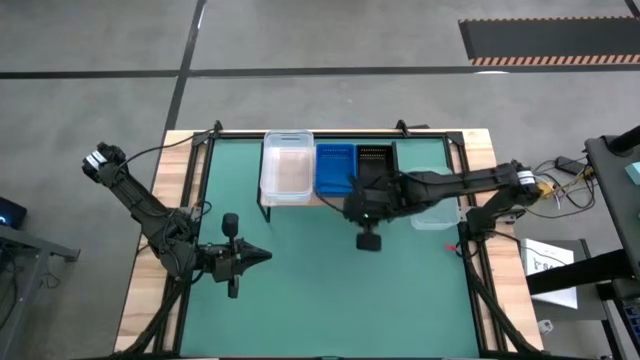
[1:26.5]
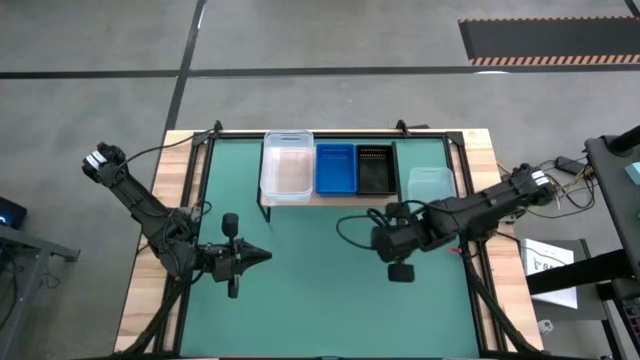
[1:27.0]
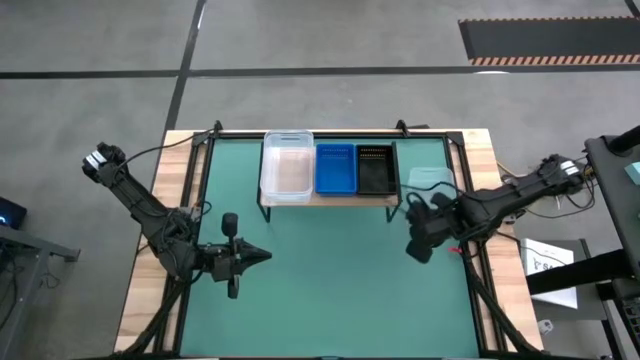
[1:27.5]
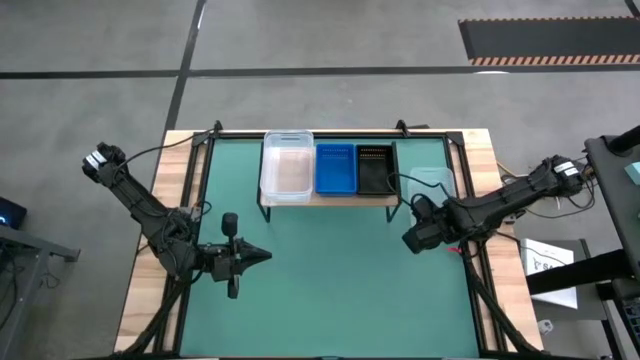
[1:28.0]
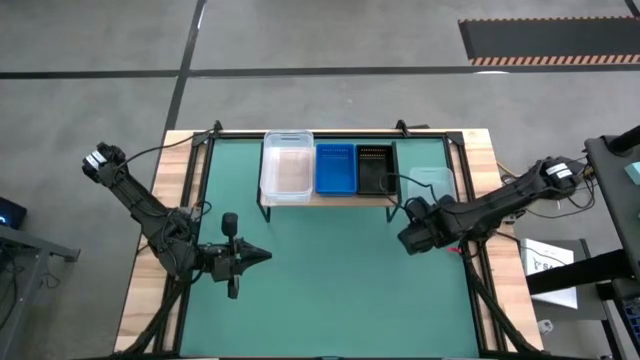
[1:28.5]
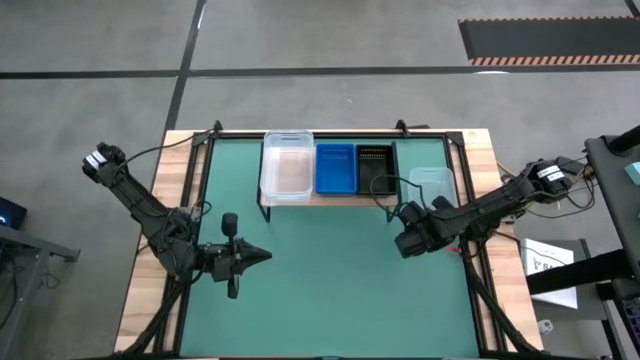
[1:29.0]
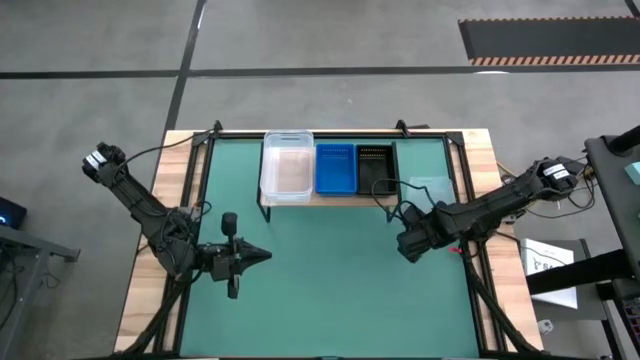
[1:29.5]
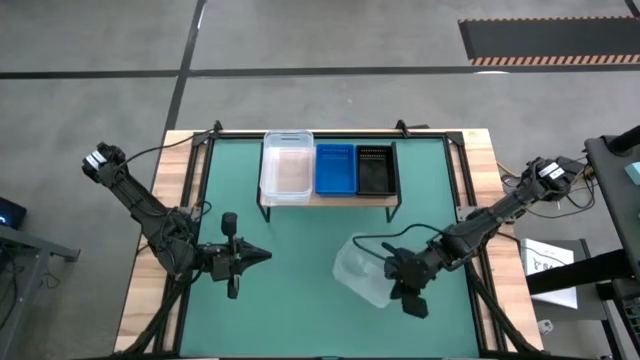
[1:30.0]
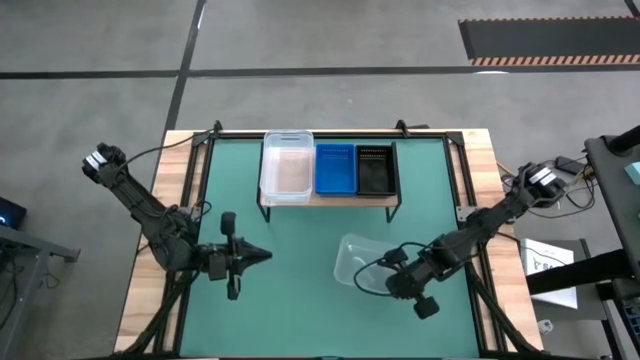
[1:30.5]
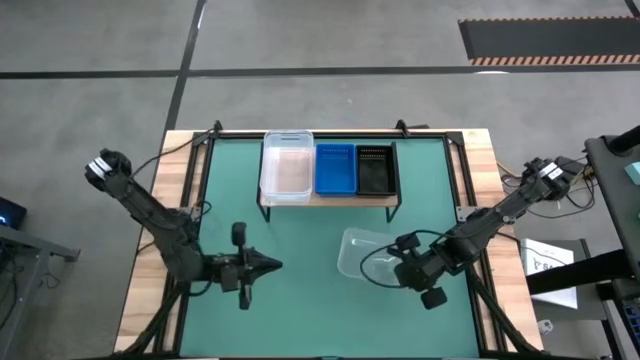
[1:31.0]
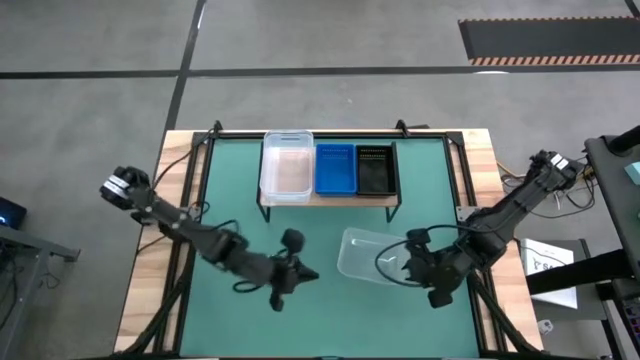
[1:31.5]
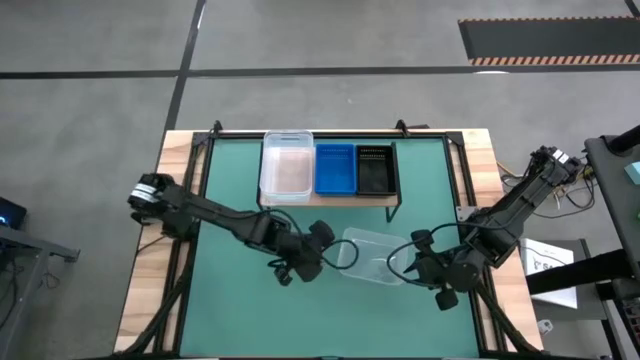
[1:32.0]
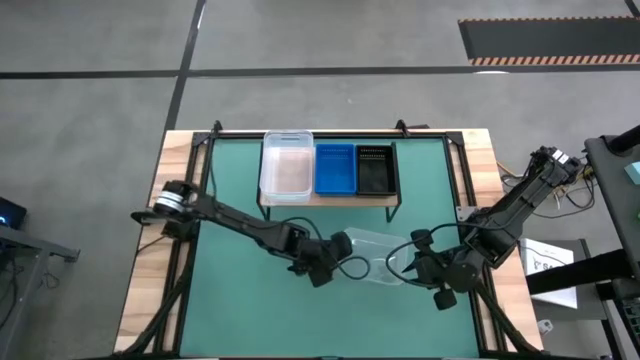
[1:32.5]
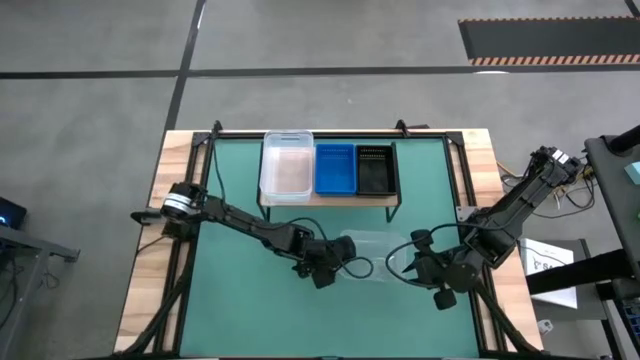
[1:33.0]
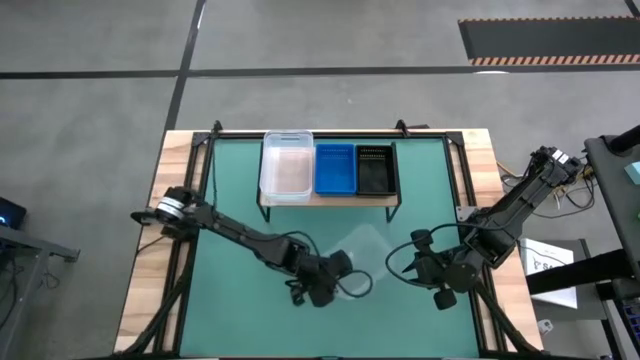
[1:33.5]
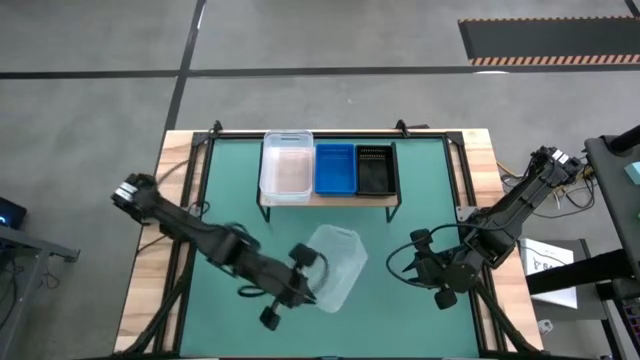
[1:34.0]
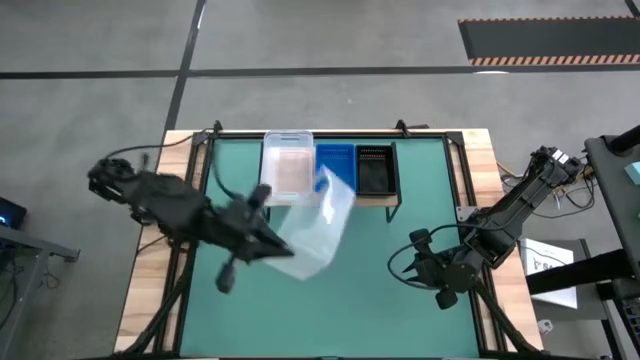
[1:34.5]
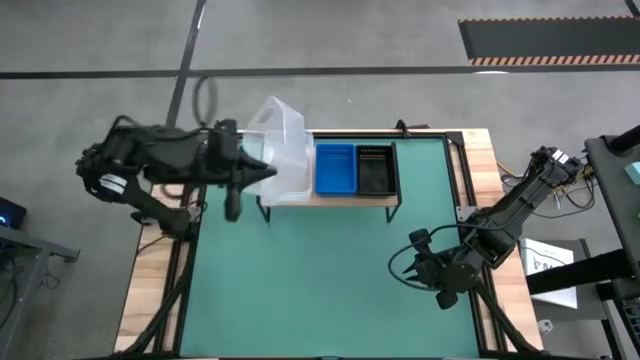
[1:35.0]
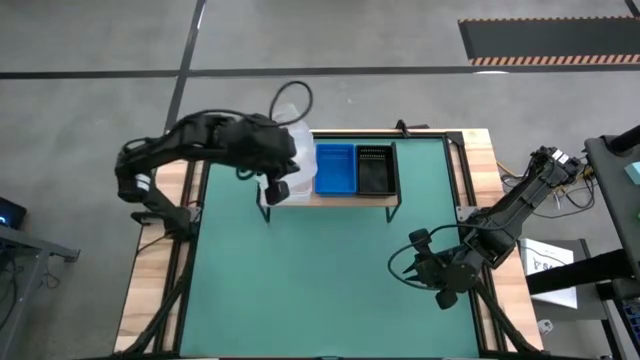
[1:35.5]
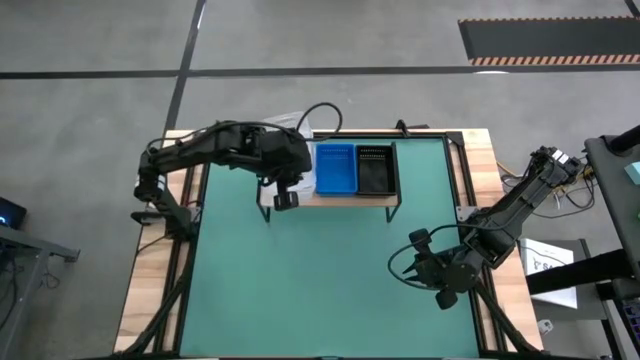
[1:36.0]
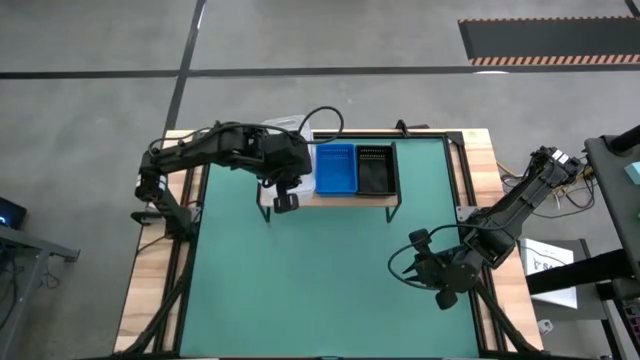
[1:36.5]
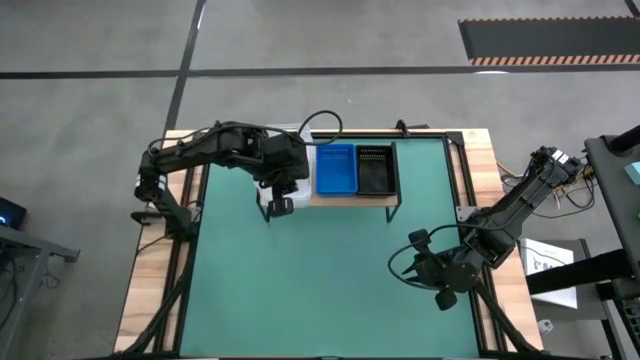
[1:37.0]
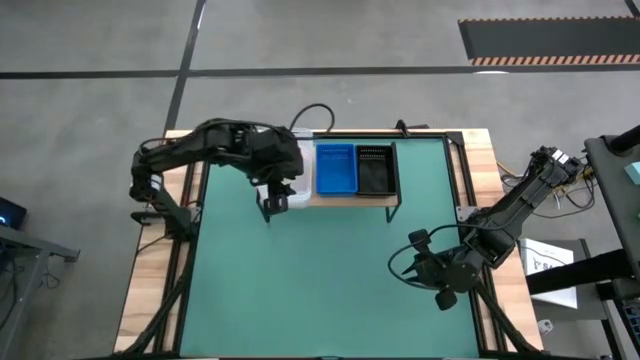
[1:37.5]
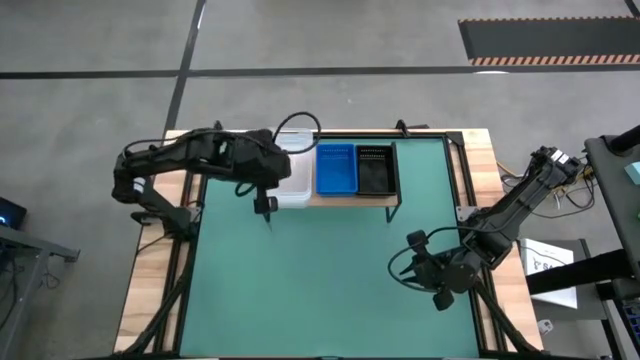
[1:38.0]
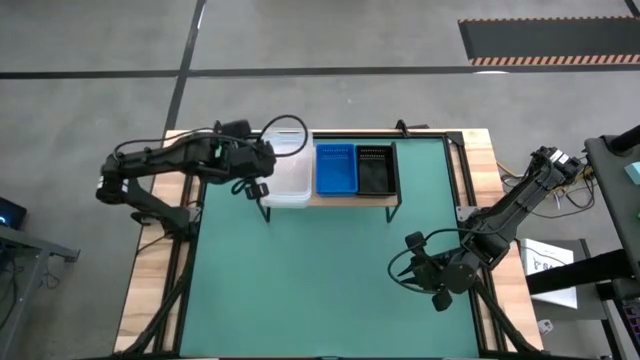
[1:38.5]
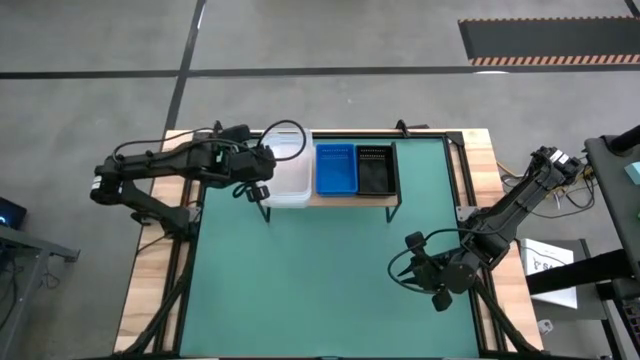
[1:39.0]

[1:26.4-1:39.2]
Task: Stack baskets on shelf by color
Stack the transparent bin on top of the transparent bins on the shelf

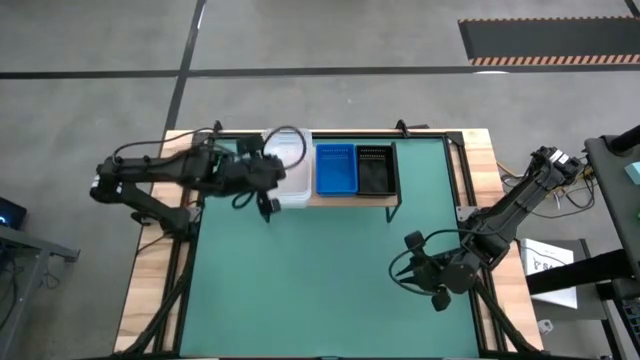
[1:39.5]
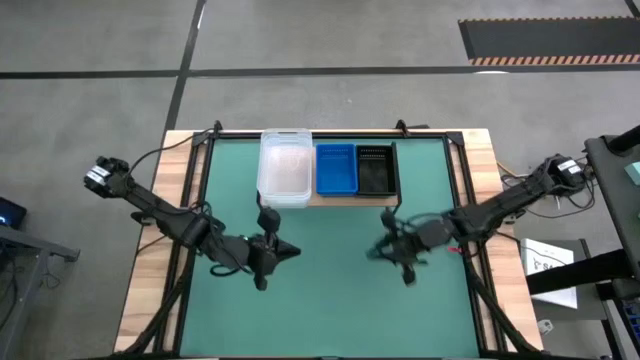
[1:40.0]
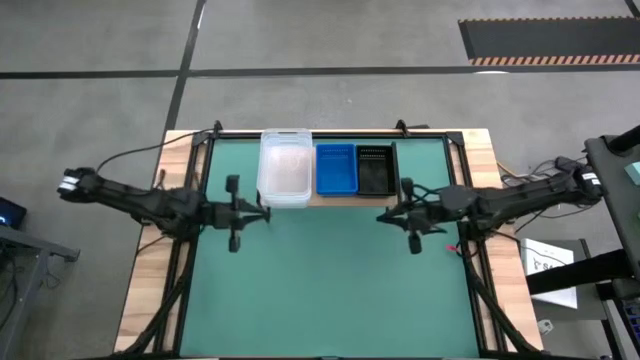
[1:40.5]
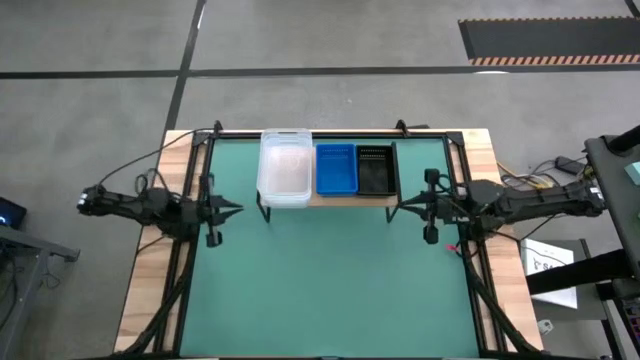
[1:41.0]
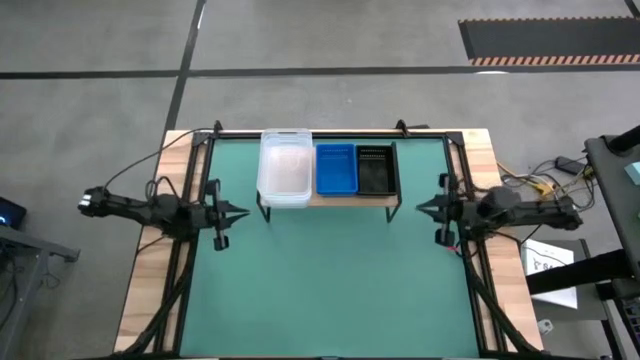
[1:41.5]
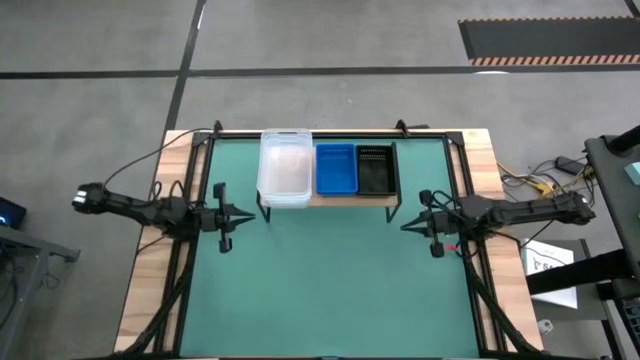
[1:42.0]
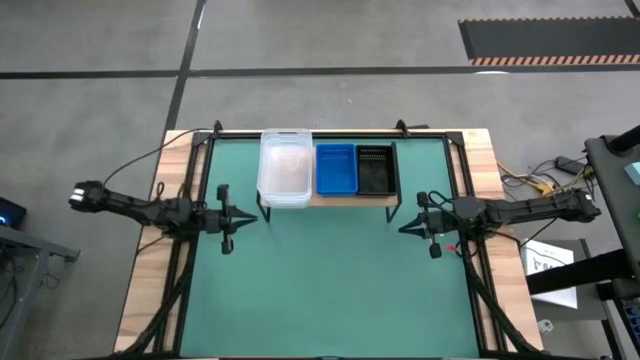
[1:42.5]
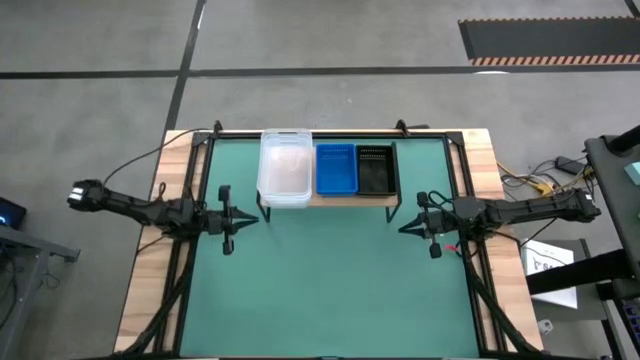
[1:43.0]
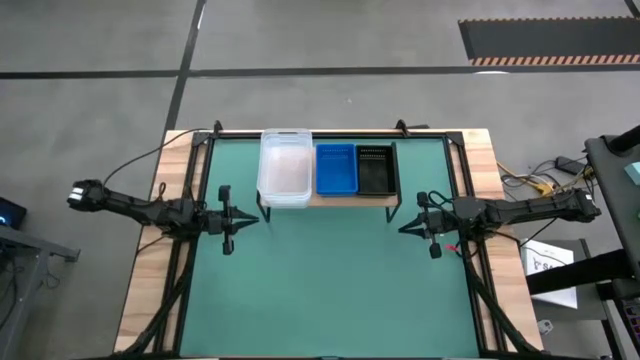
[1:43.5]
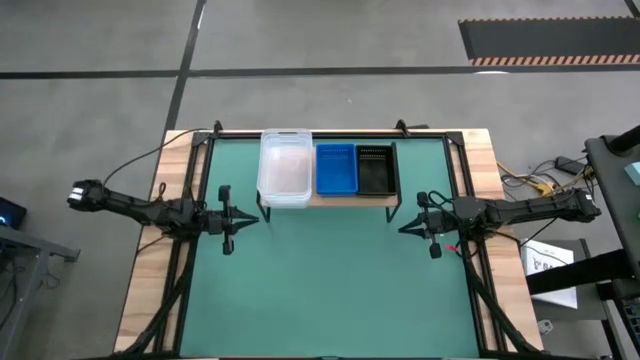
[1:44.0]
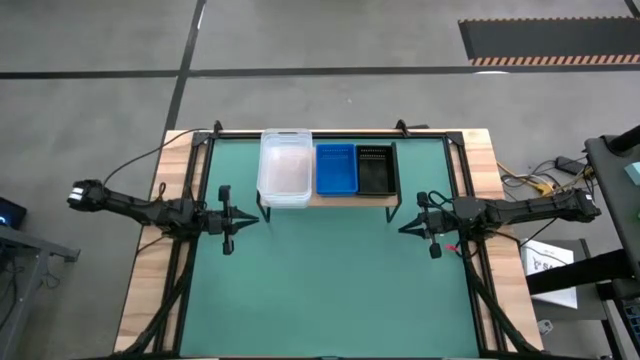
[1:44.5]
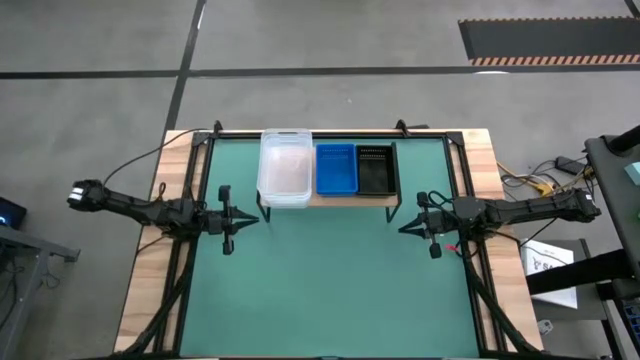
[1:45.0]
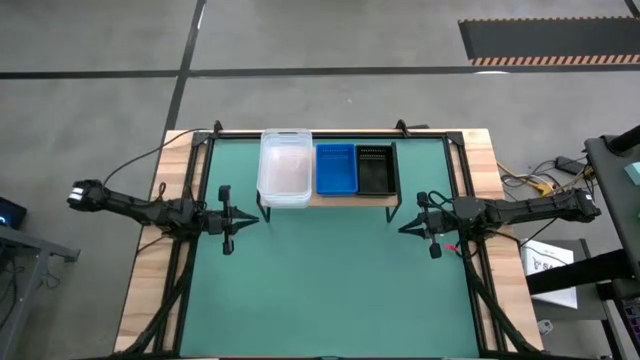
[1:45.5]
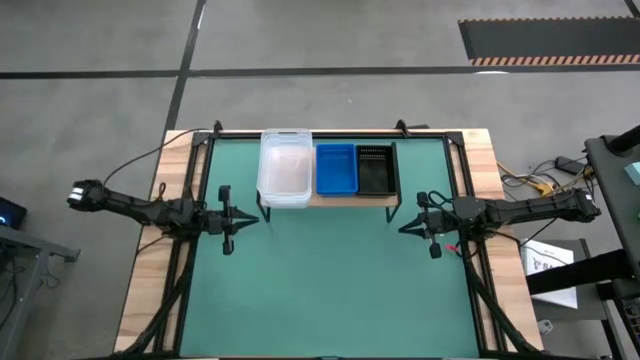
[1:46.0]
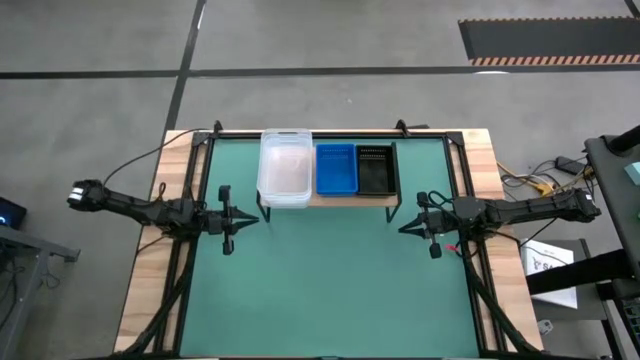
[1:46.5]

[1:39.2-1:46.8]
Return to Home Position

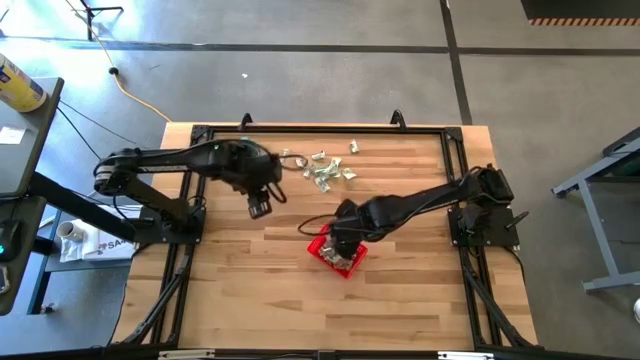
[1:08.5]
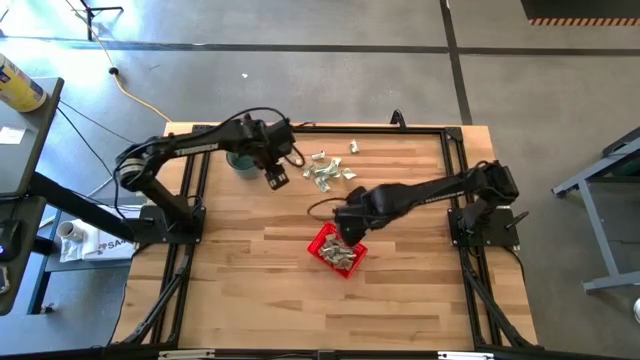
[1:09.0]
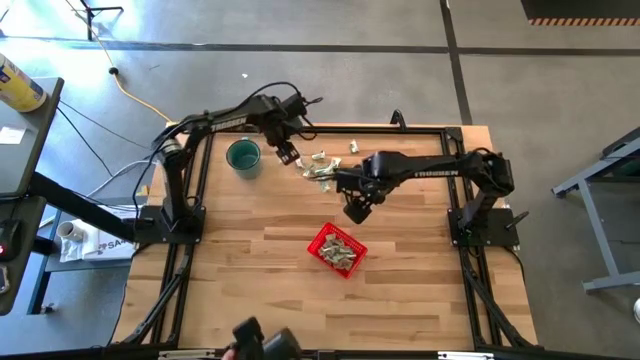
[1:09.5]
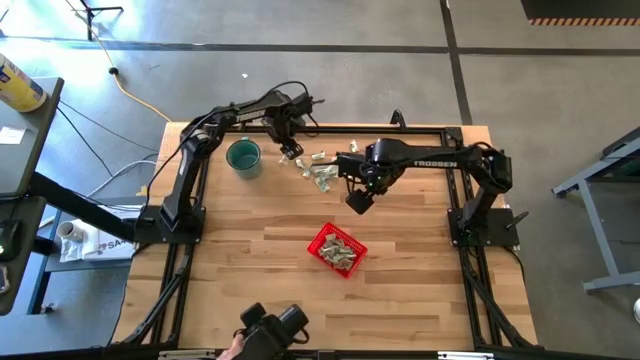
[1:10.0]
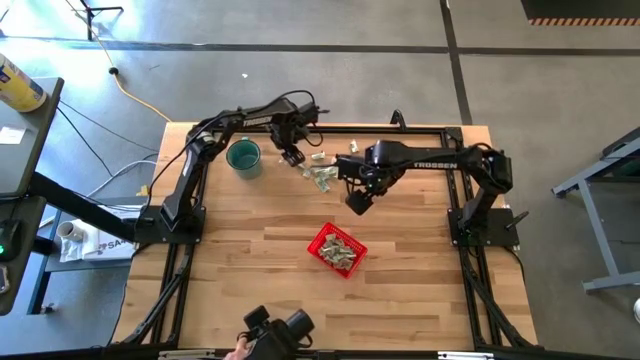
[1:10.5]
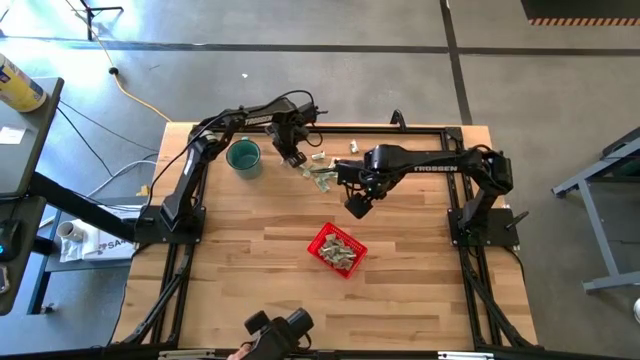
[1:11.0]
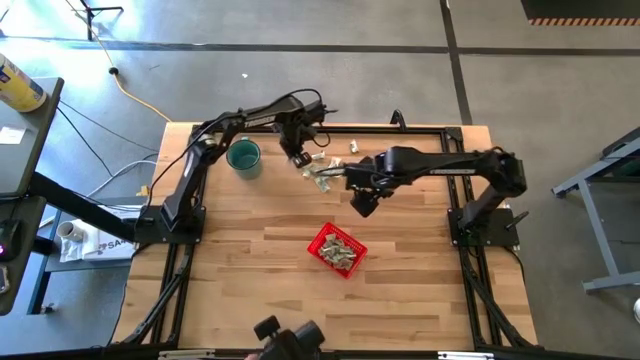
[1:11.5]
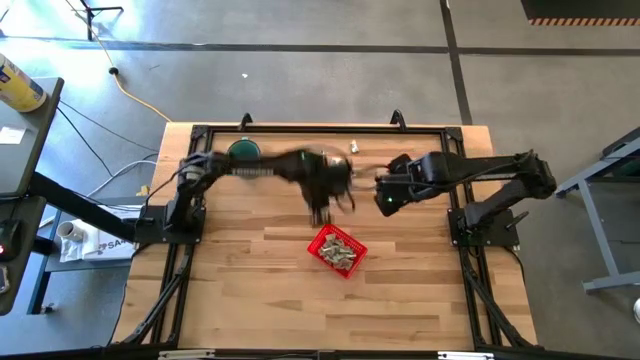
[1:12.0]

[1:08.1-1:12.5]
Task: Pick and place Stevia / Truvia into bins
Put the light green stevia packet into the bin
